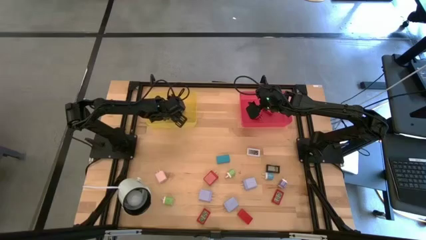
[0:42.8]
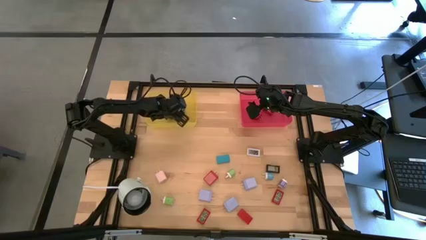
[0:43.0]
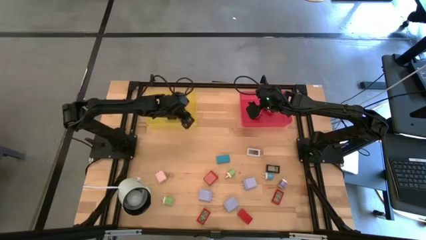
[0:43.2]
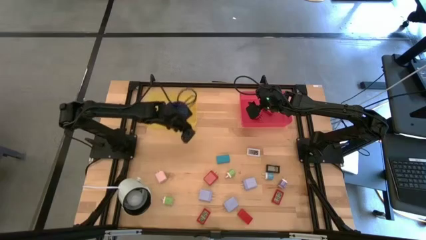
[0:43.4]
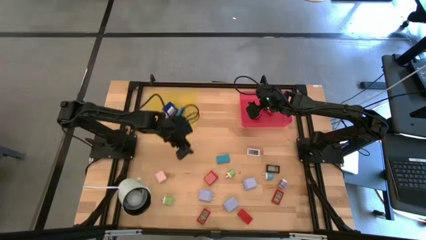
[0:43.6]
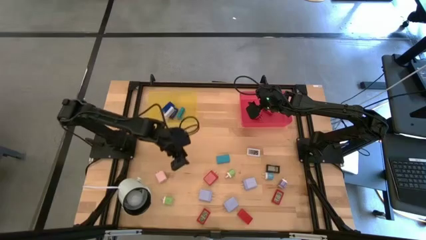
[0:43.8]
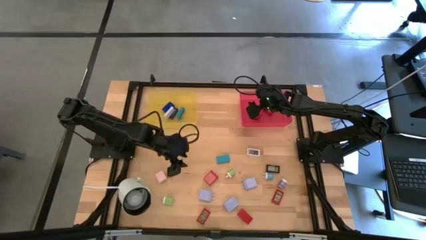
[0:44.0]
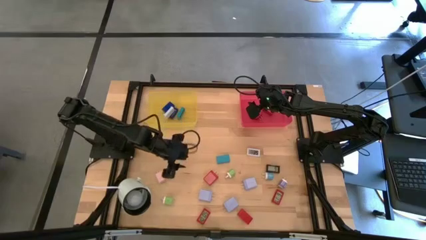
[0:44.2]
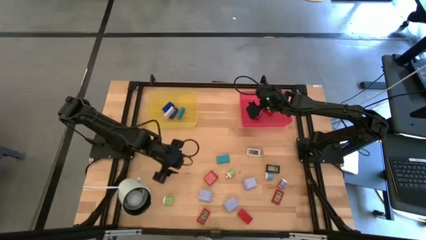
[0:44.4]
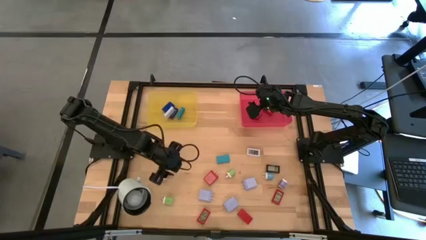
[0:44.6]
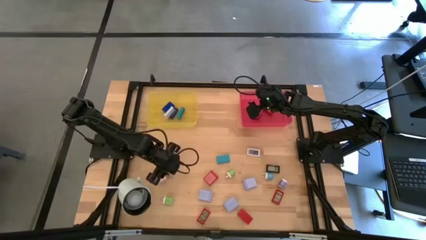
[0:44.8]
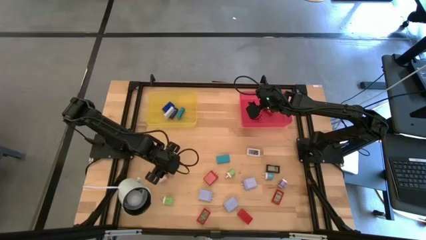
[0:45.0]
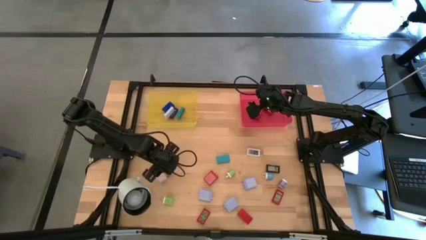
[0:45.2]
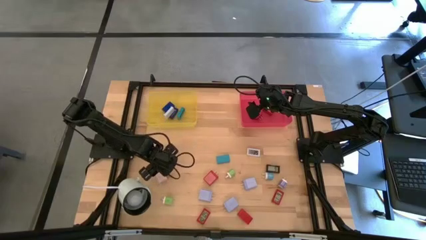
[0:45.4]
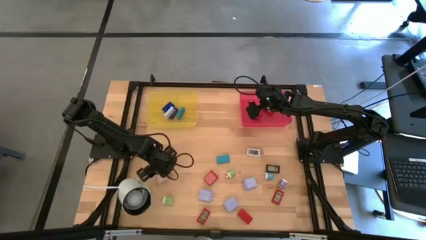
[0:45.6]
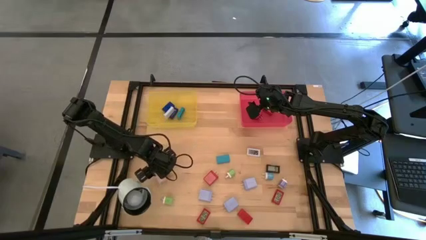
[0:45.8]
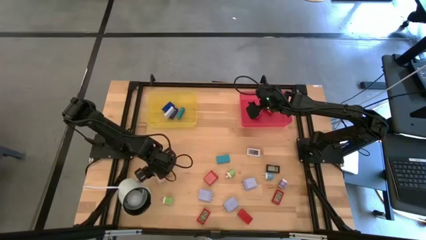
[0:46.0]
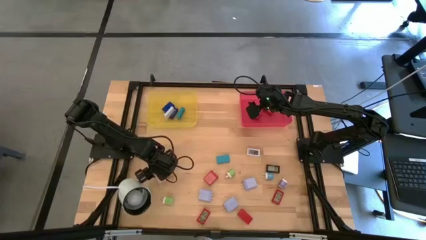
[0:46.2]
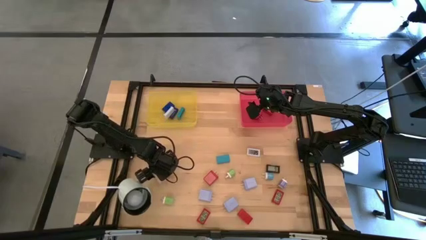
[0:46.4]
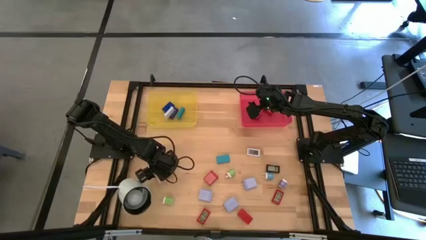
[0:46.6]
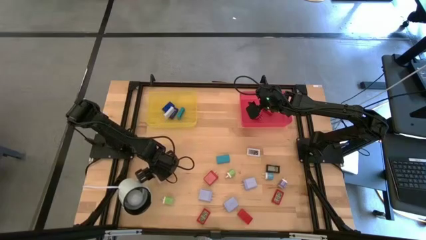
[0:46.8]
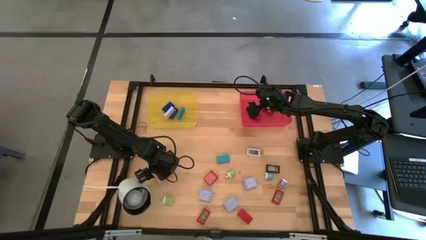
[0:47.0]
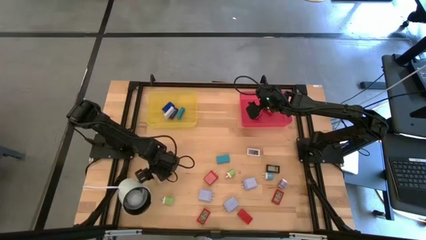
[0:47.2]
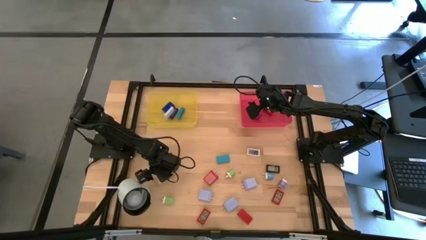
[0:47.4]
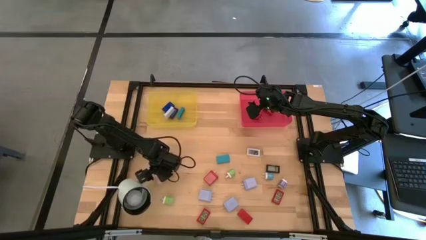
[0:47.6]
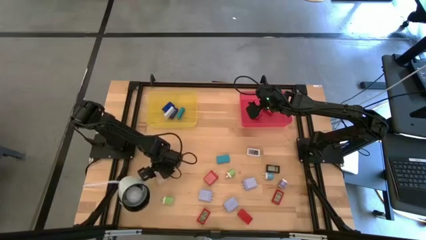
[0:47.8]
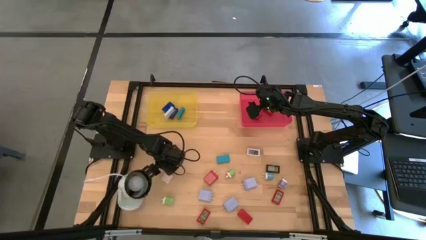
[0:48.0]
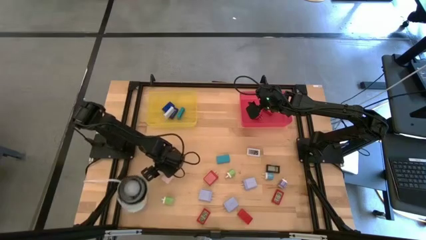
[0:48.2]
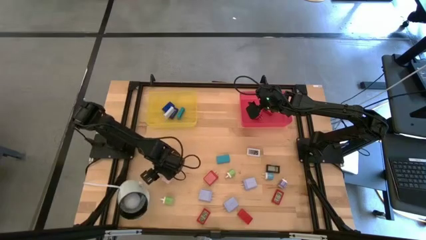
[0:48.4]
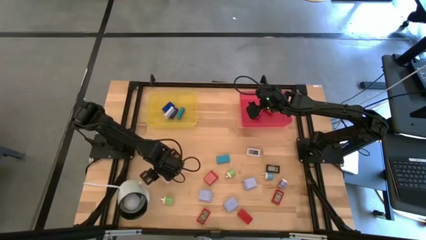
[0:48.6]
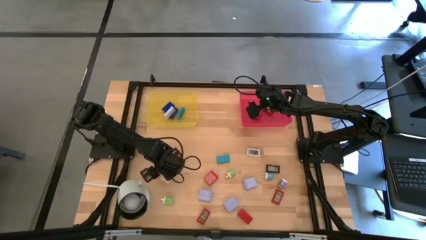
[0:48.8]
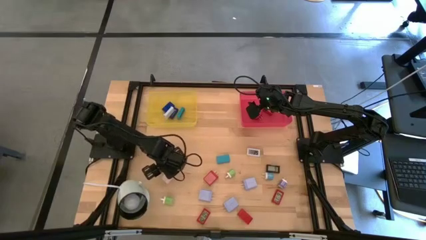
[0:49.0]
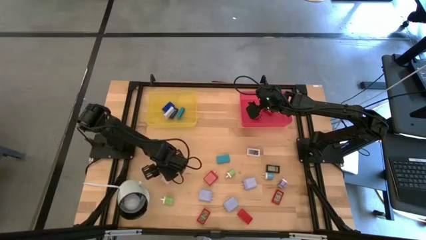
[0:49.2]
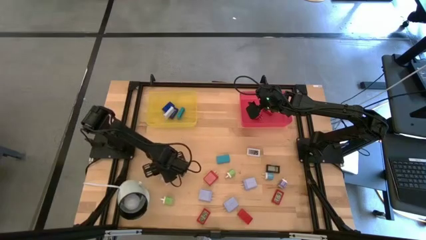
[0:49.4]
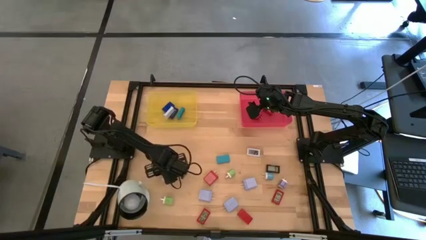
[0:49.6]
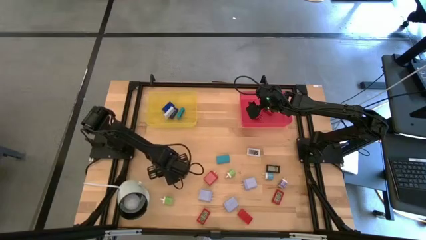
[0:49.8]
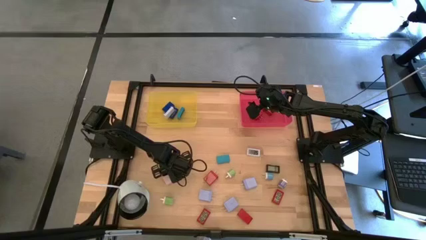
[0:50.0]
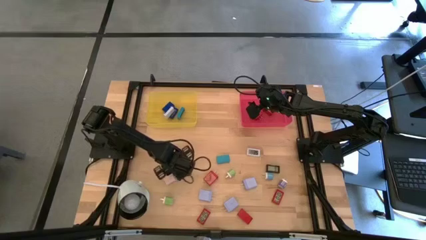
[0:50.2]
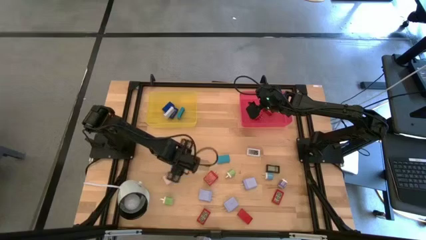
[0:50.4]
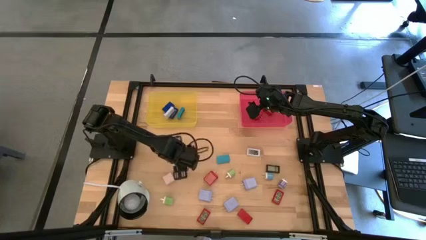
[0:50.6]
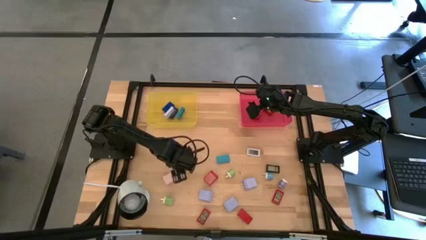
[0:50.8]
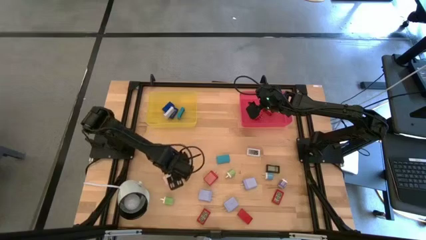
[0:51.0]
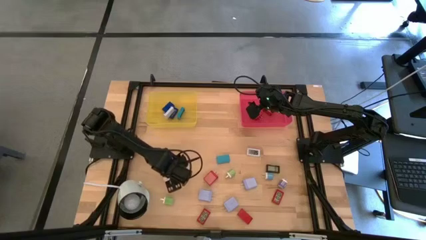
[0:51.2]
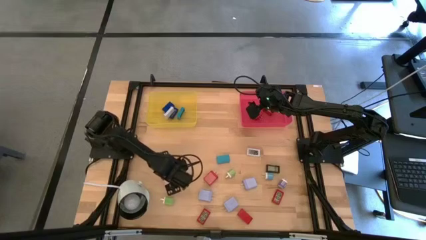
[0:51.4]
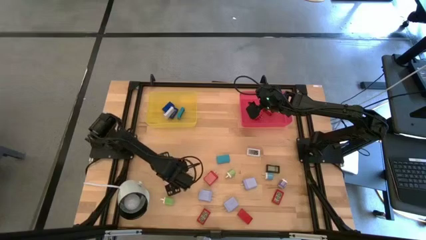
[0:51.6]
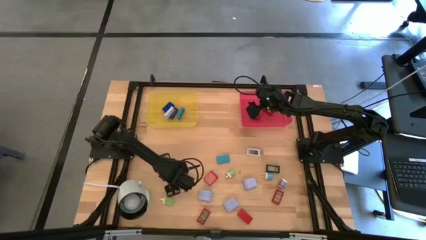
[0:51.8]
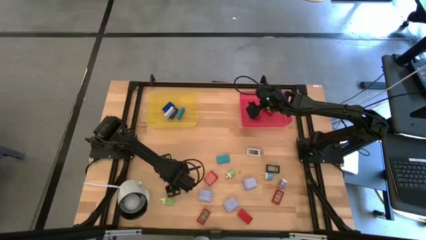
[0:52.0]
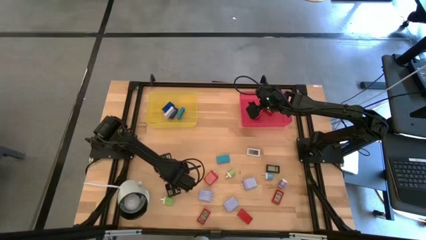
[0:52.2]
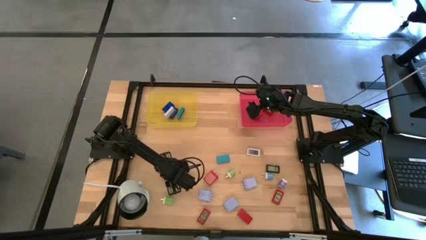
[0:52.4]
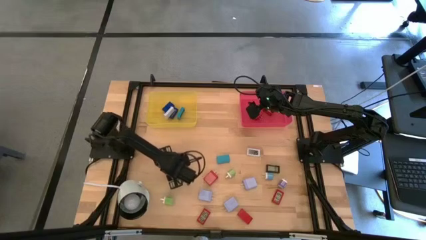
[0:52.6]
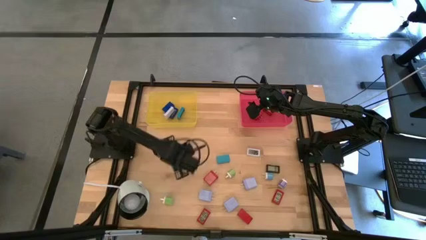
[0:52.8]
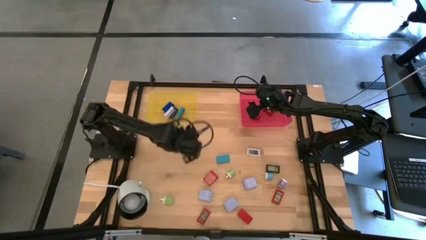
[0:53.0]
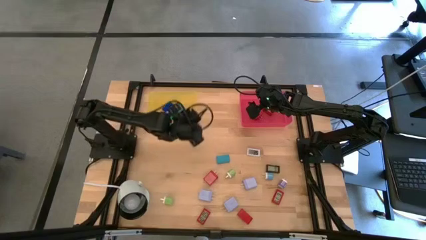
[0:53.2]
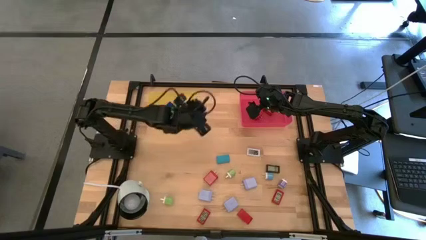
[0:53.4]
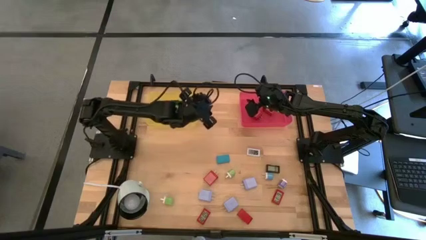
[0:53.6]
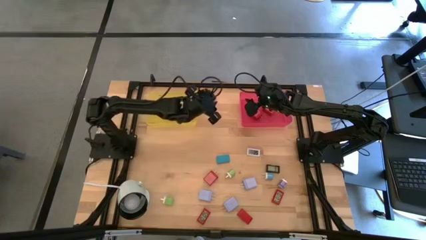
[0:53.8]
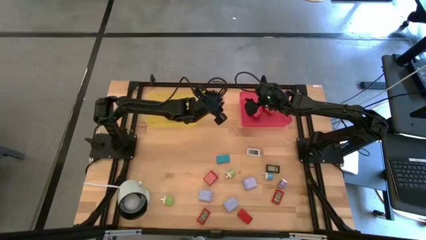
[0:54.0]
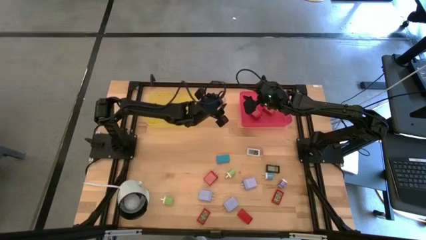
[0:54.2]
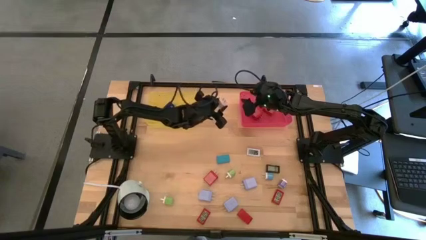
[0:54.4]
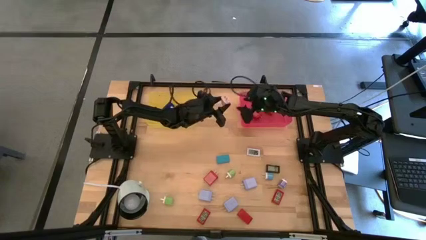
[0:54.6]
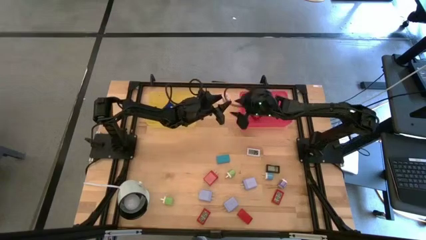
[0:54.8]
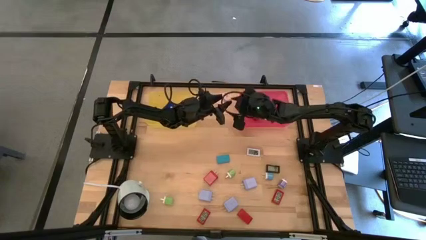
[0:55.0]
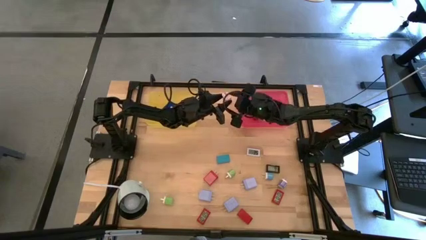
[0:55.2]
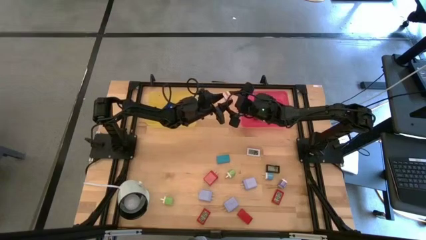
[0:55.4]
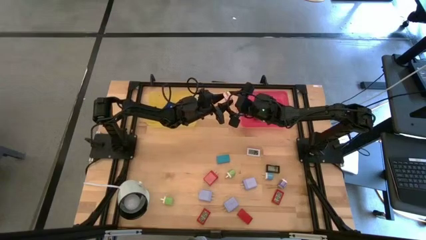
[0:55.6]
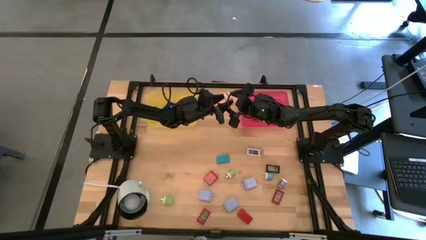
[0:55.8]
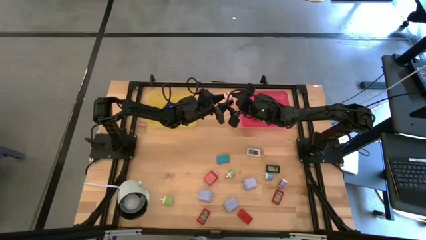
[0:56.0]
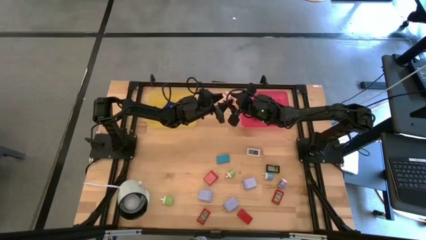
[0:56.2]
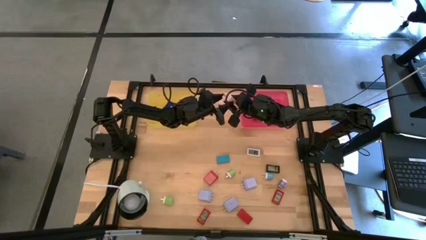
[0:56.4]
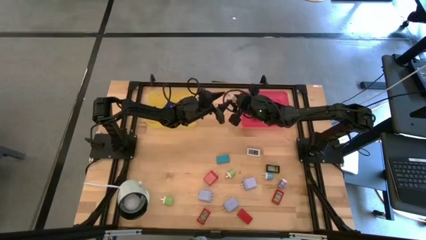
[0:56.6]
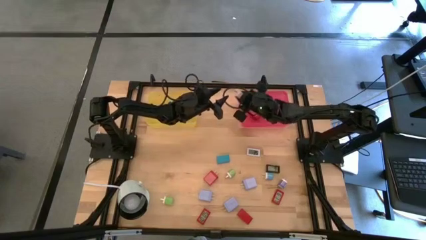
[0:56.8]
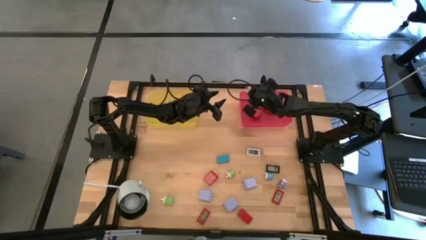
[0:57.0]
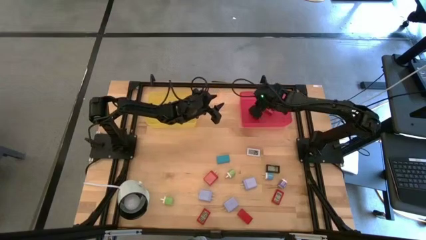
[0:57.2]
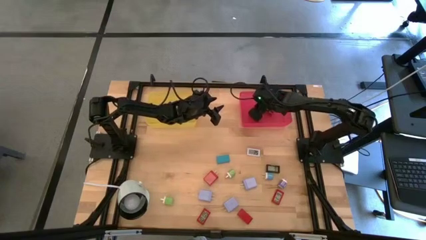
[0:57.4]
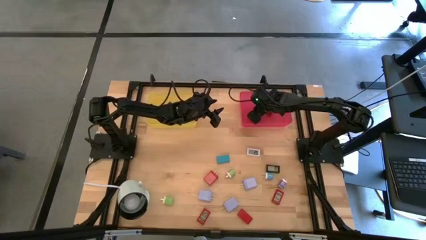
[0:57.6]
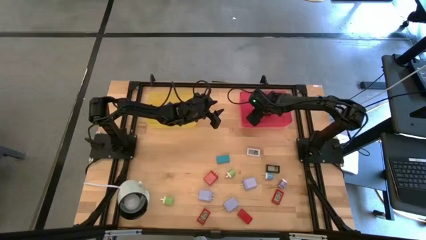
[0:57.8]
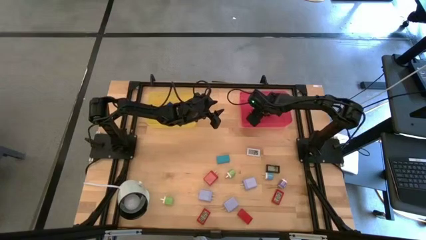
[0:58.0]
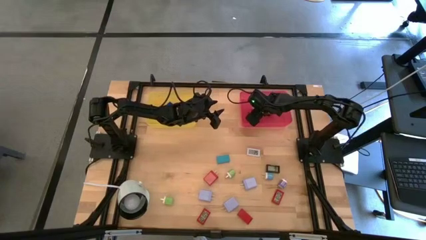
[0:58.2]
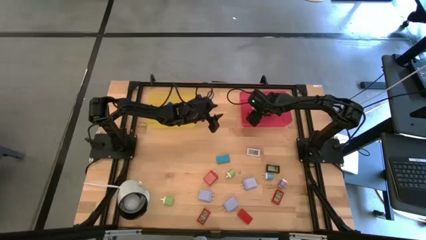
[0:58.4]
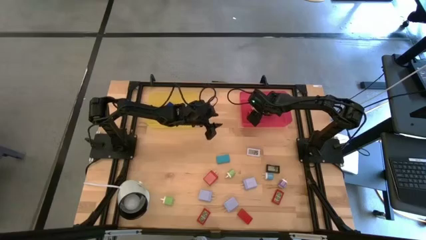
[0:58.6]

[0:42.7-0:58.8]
Task: Pick & Place Office items
Put the white charger adapter into the red bin
